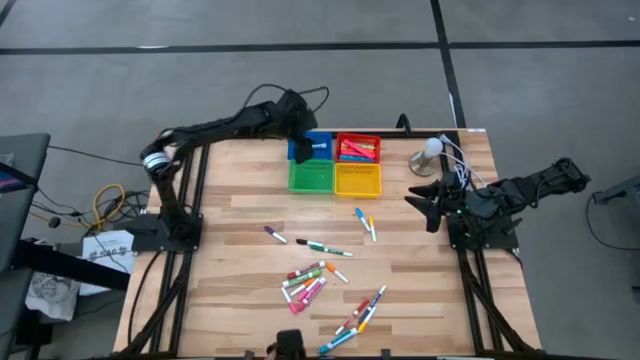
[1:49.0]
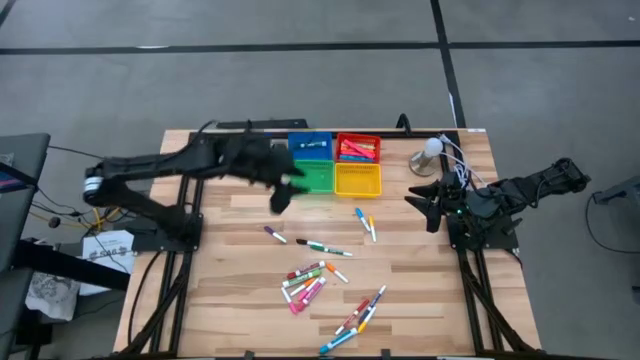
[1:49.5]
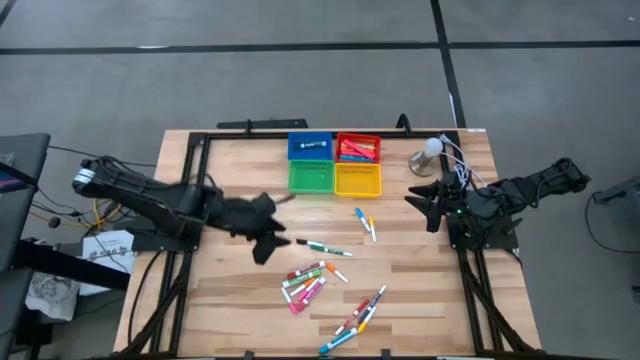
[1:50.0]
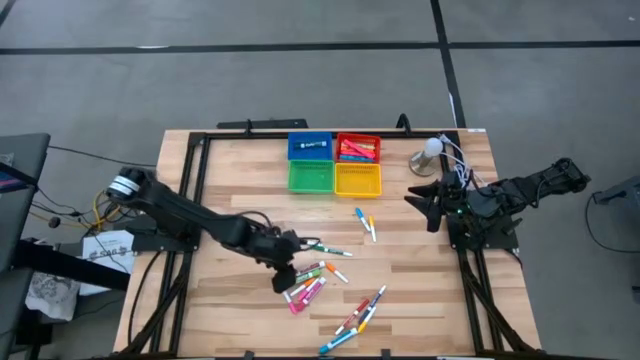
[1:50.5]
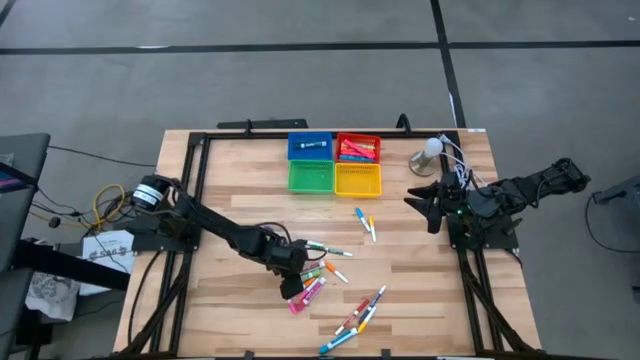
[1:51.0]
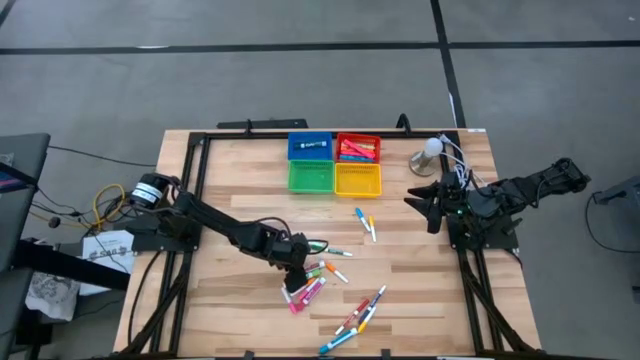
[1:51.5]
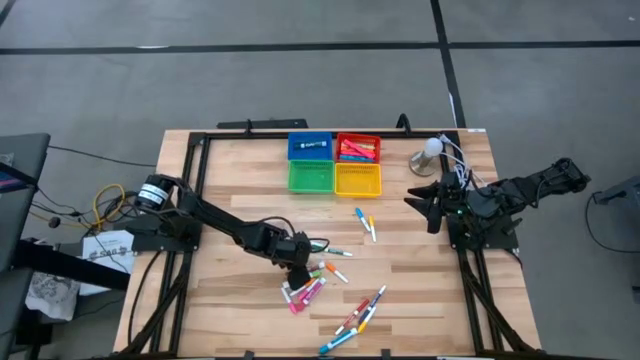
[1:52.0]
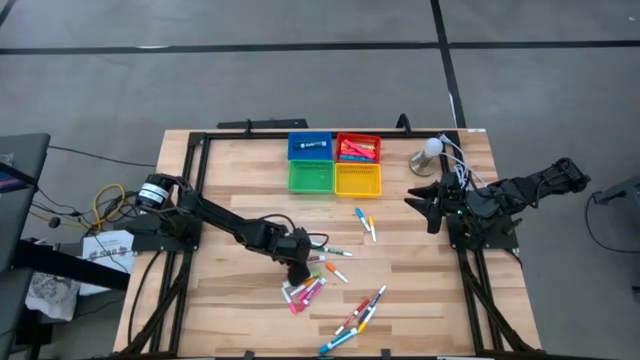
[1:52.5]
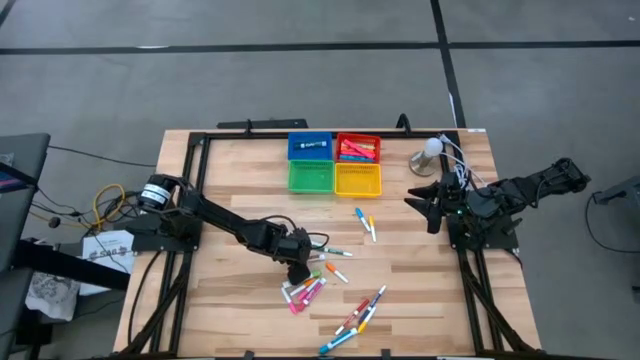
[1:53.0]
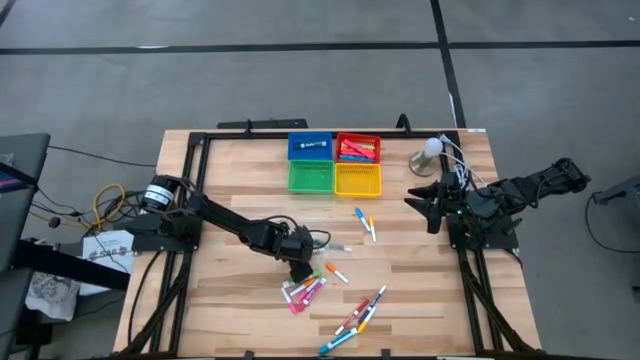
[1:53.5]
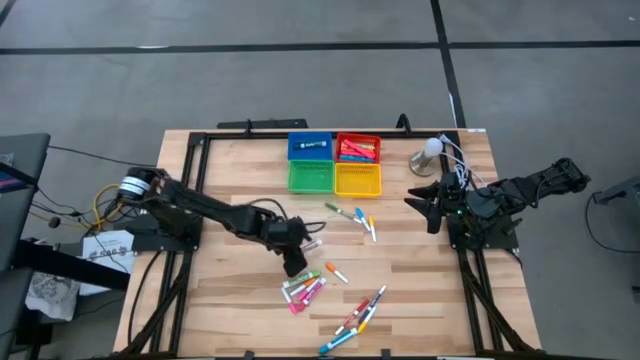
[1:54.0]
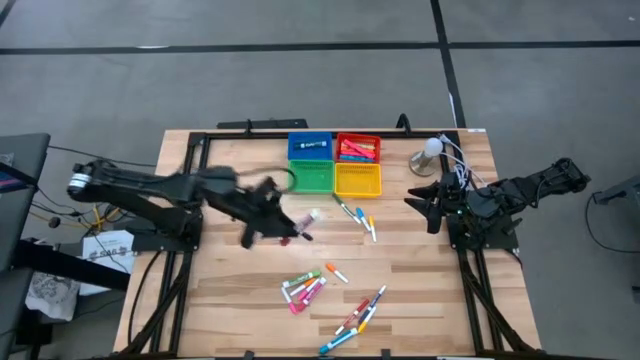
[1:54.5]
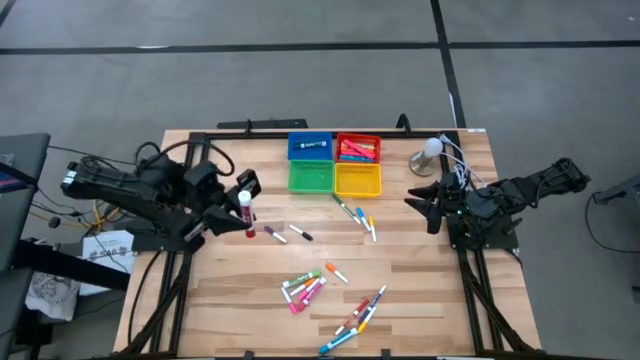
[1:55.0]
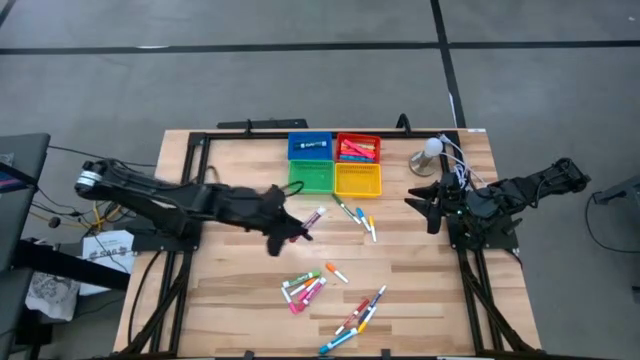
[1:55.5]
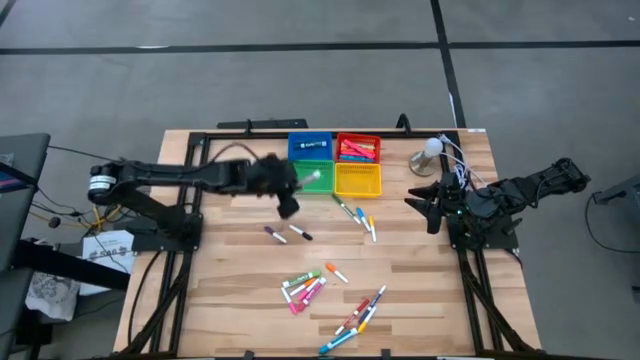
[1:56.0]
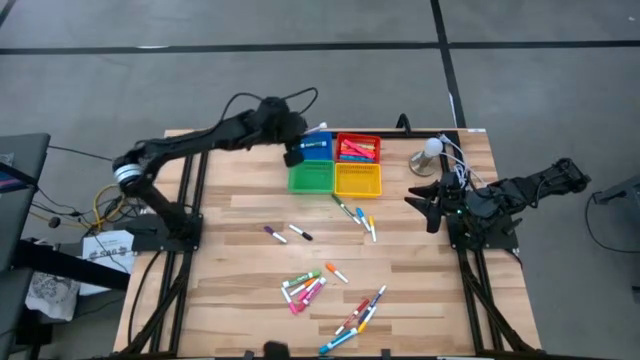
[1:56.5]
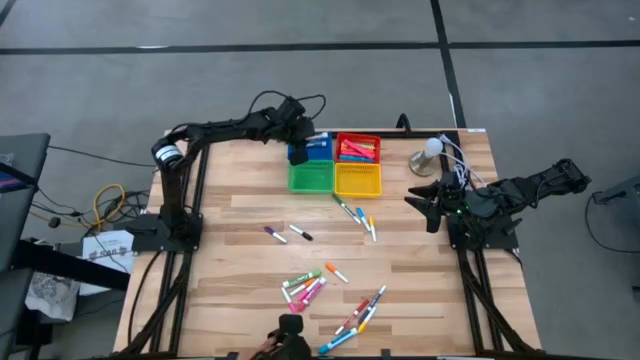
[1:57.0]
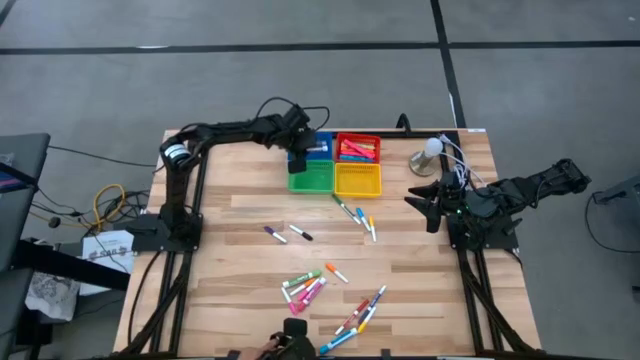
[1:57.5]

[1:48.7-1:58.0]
Task: Pick & Place Markers
Put the red highlighter in the blue bin

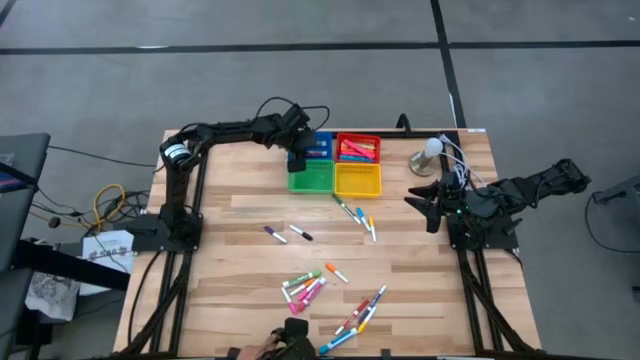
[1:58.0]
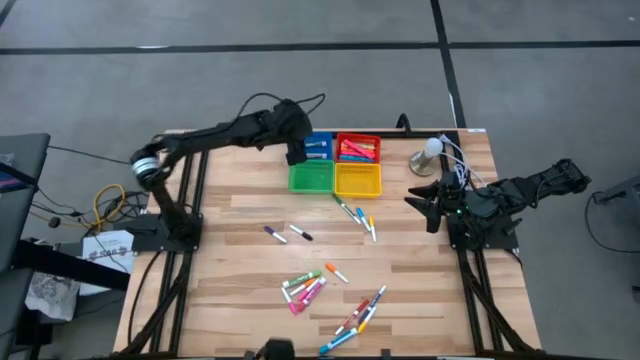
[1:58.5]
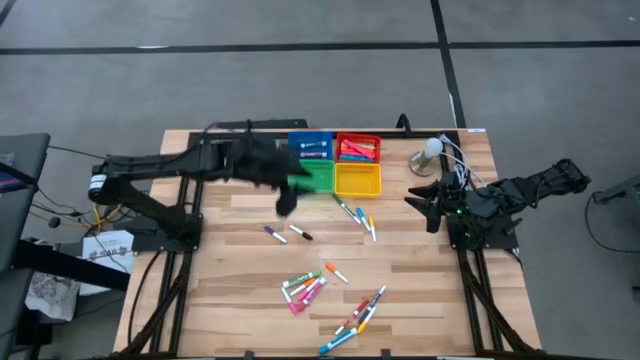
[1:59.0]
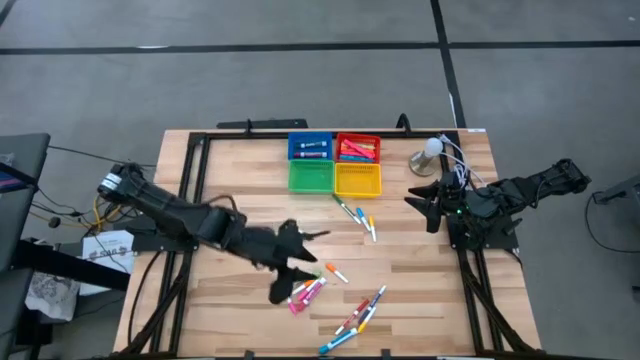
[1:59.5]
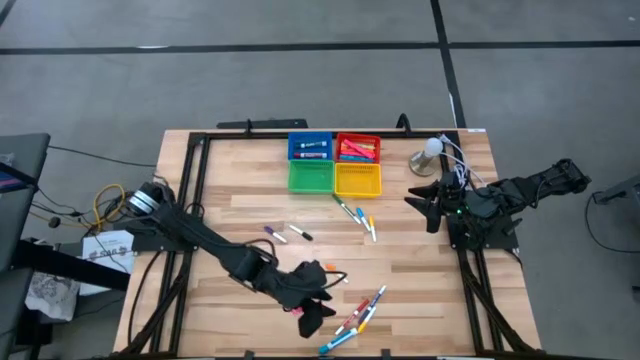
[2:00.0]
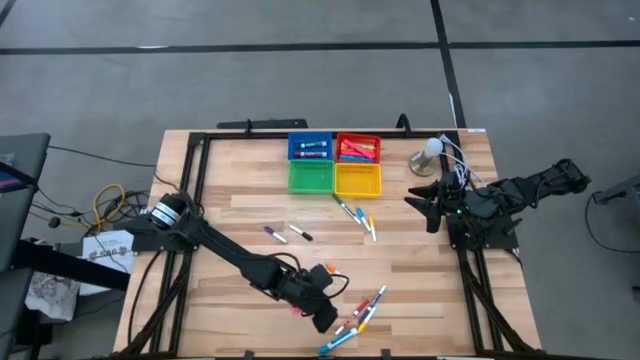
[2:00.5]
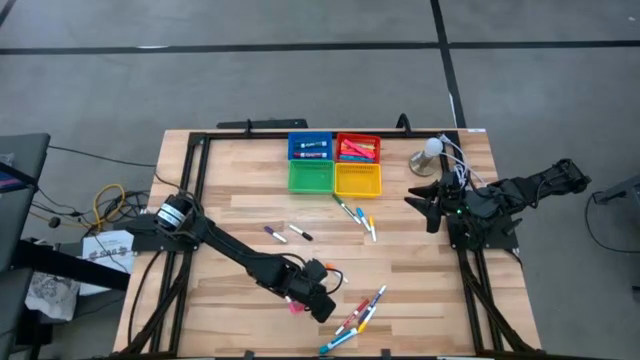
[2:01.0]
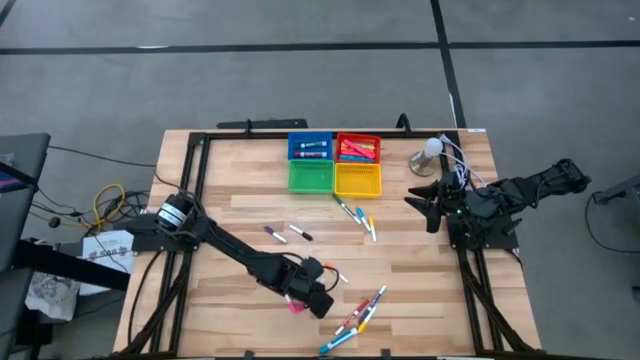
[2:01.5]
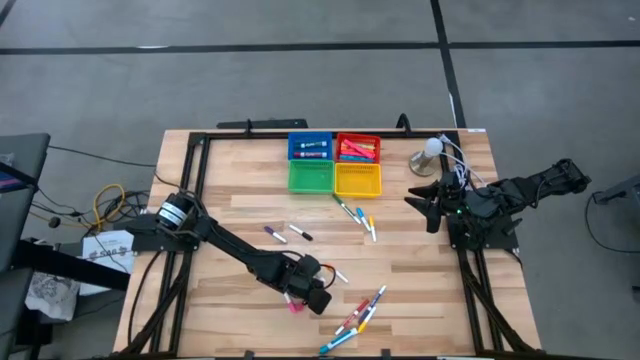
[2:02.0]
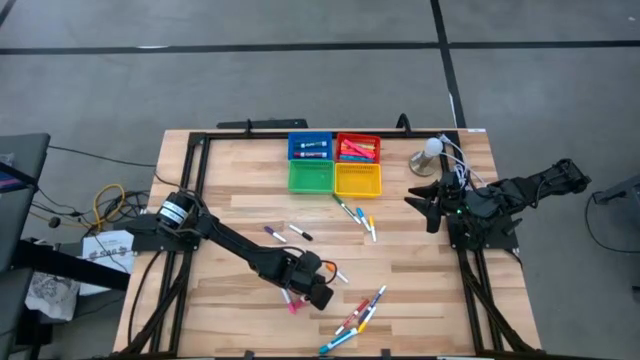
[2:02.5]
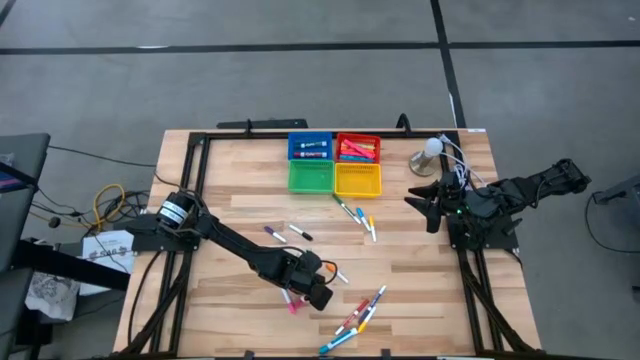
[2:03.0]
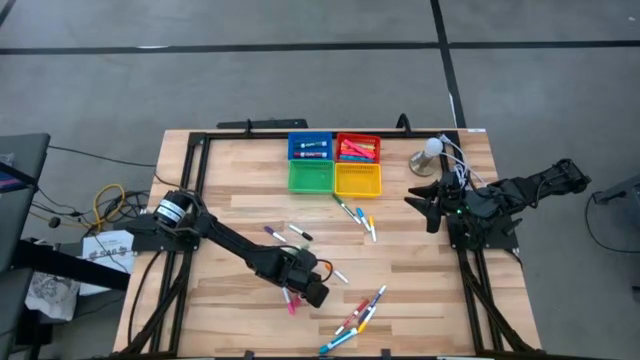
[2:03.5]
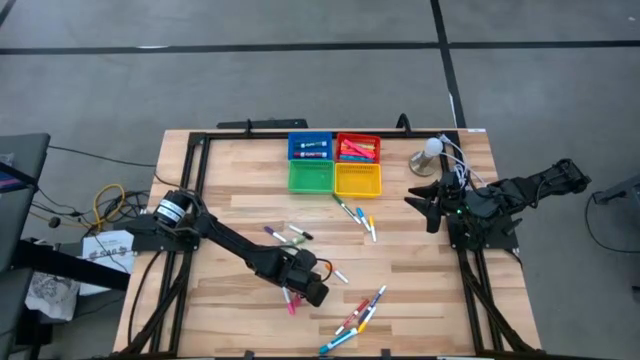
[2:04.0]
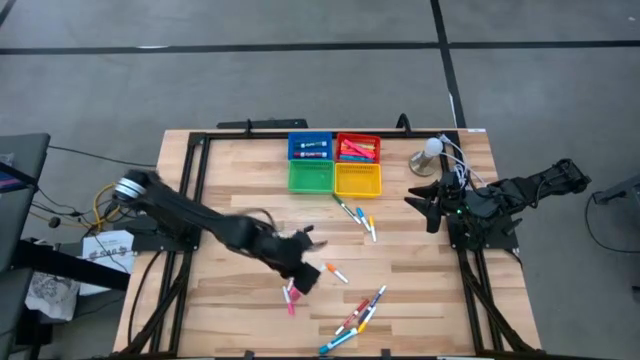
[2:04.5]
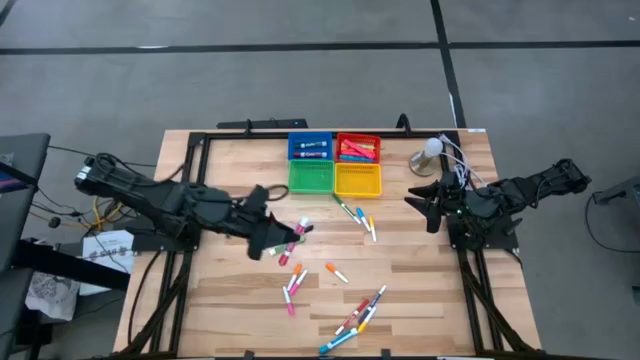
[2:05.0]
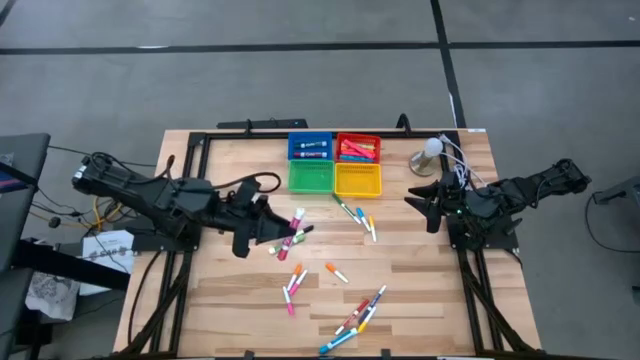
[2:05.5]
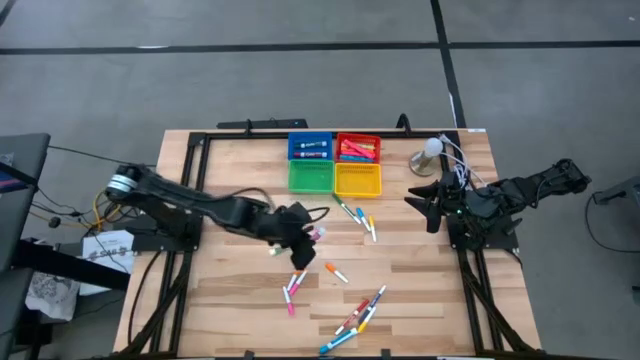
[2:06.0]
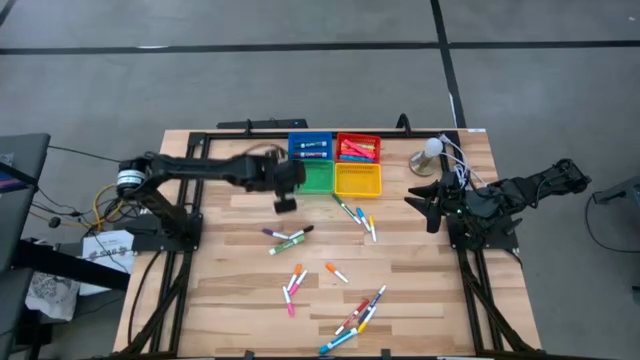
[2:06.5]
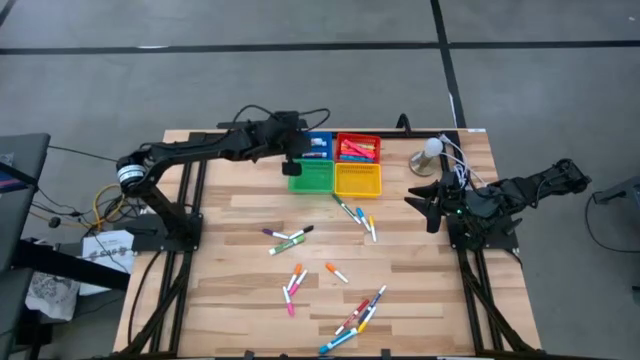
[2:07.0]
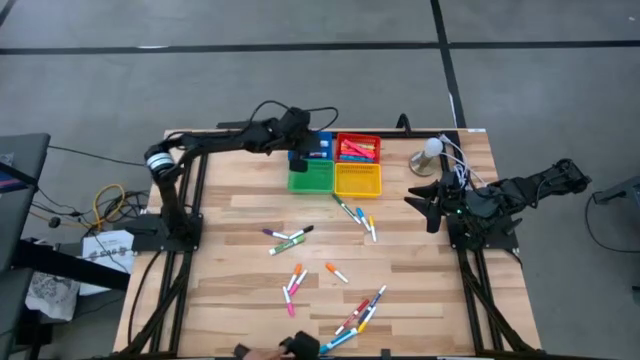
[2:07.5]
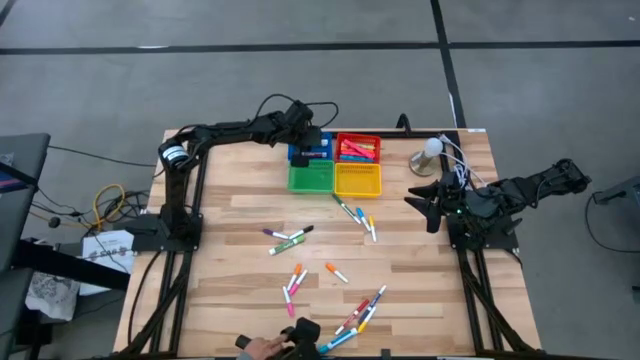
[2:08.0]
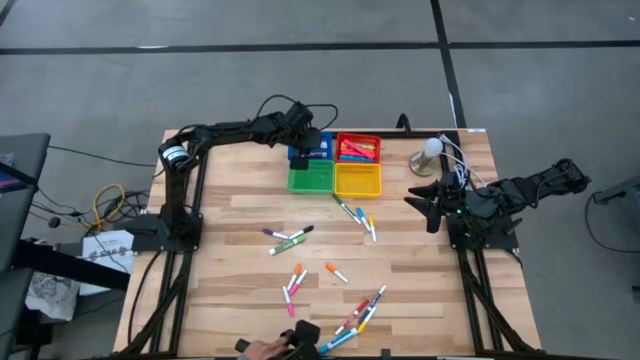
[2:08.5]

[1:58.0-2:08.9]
Put the pink highlighter in the blue bin
